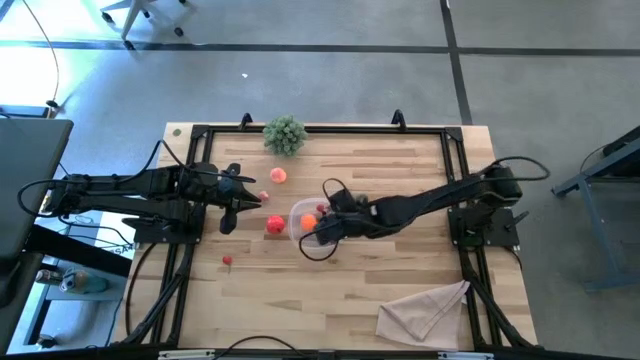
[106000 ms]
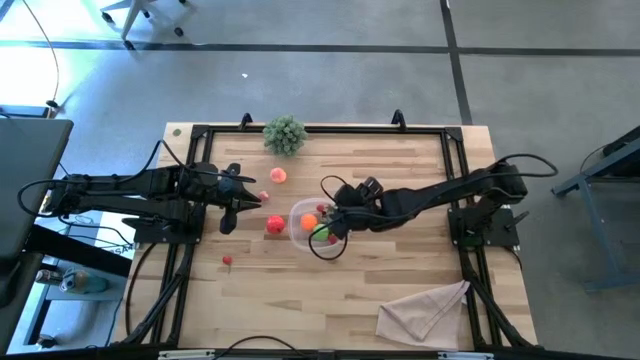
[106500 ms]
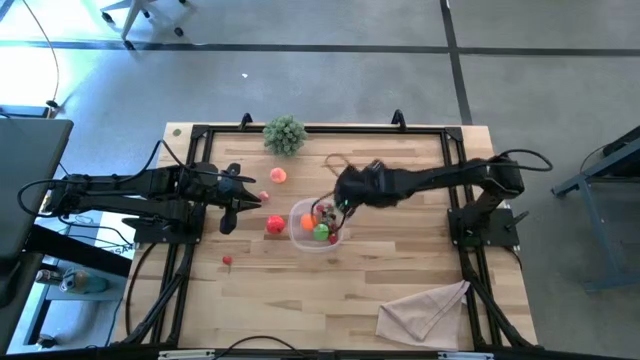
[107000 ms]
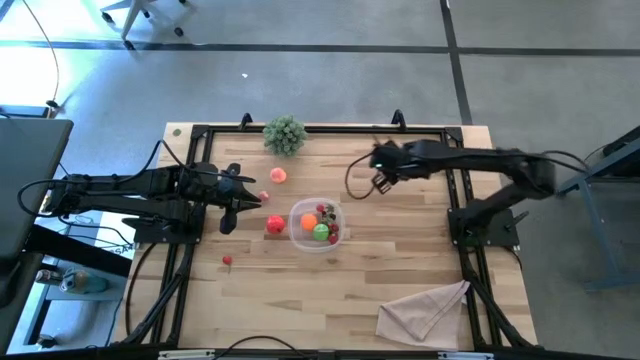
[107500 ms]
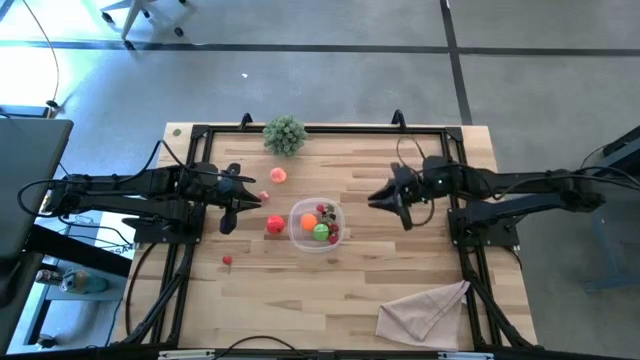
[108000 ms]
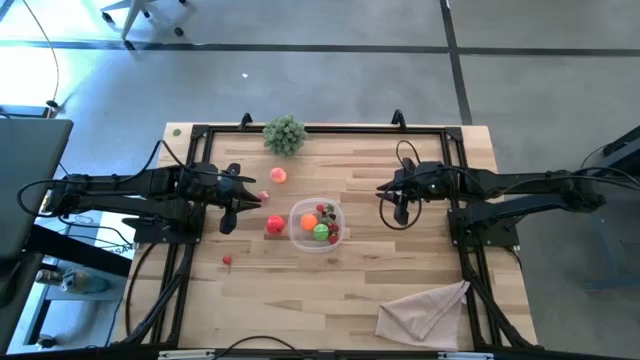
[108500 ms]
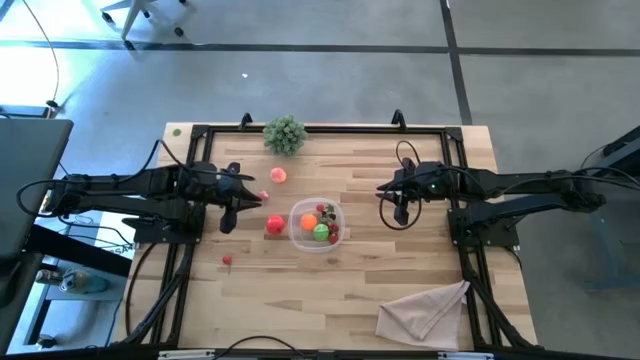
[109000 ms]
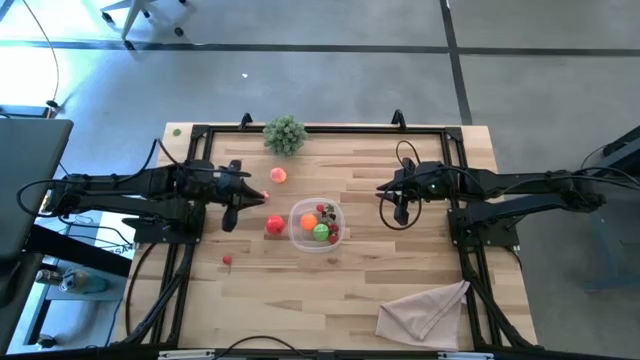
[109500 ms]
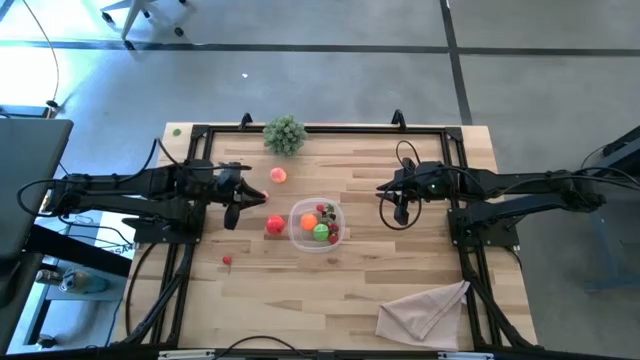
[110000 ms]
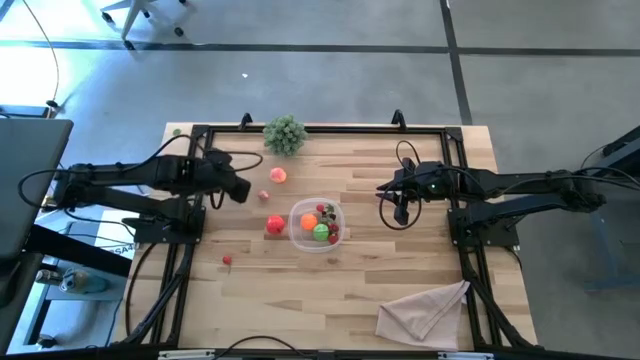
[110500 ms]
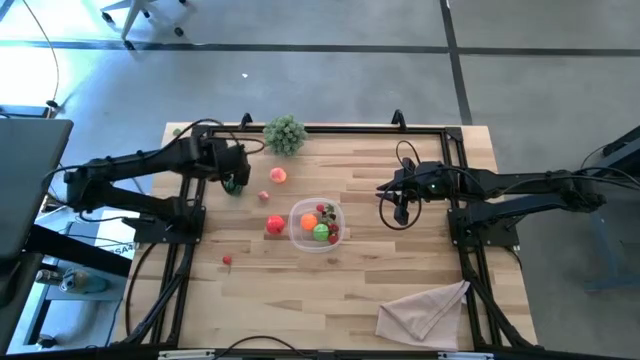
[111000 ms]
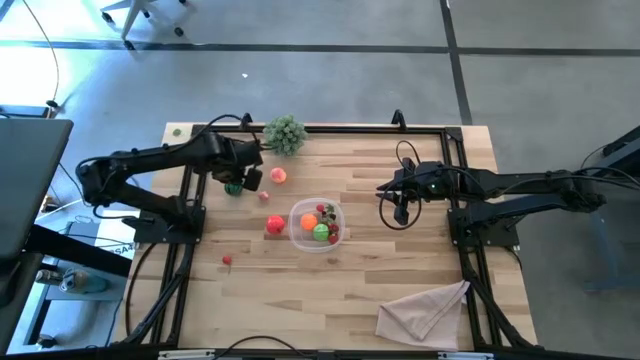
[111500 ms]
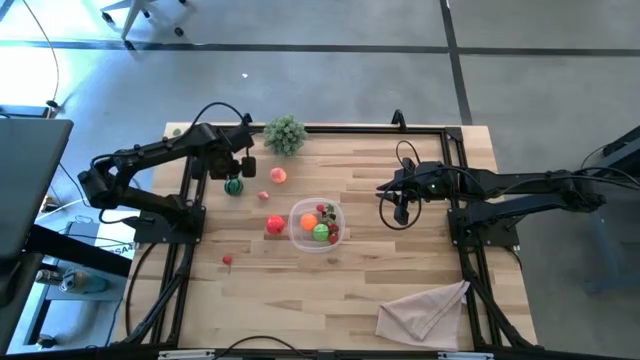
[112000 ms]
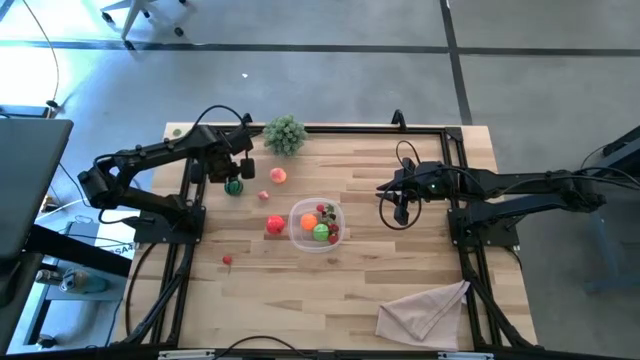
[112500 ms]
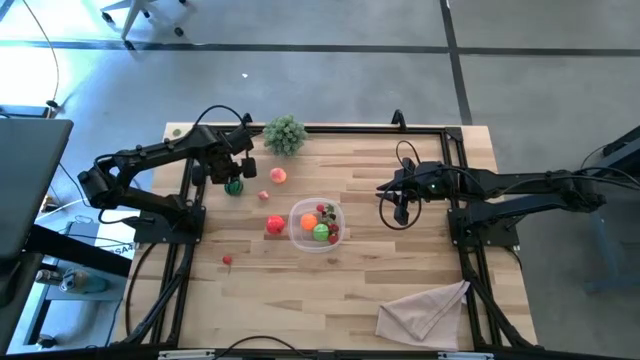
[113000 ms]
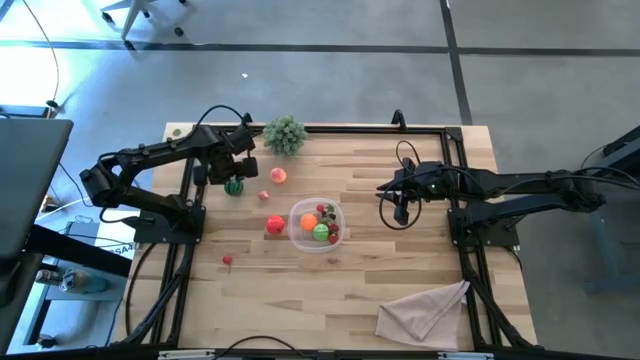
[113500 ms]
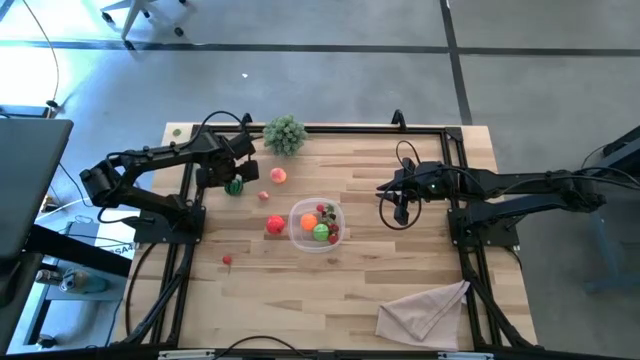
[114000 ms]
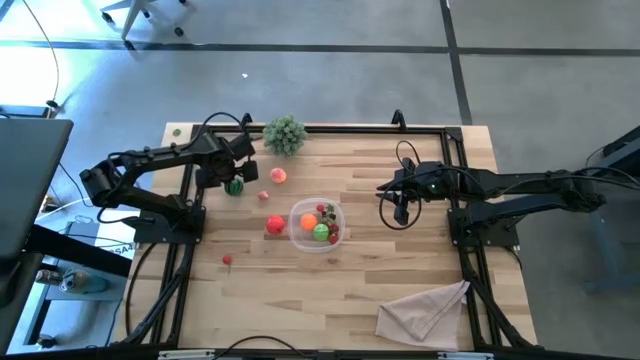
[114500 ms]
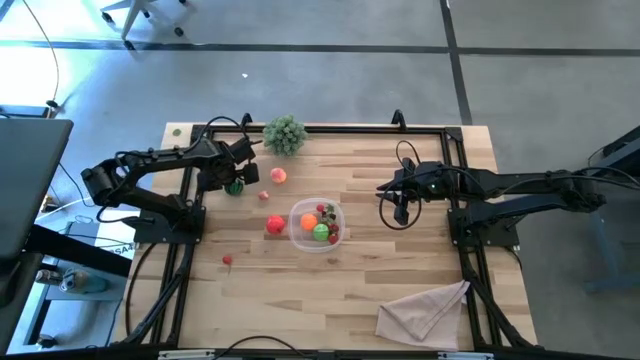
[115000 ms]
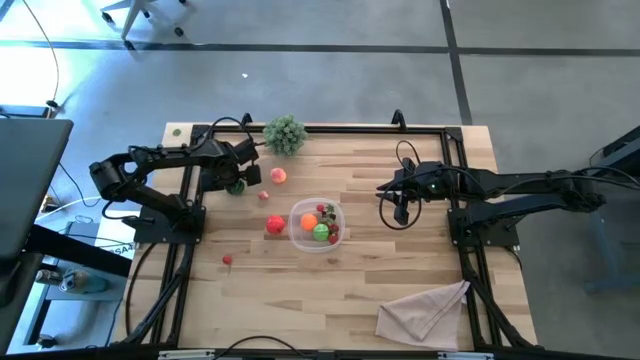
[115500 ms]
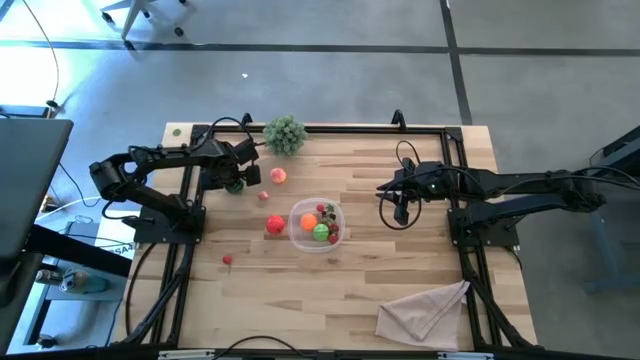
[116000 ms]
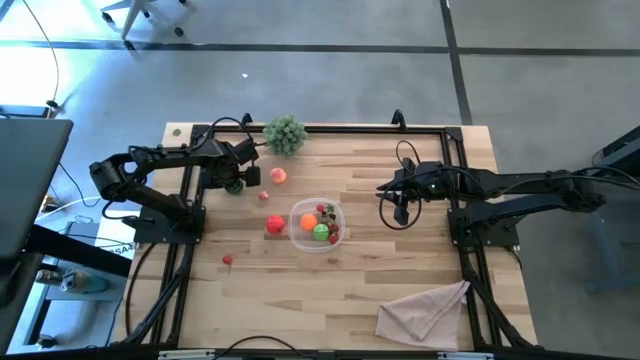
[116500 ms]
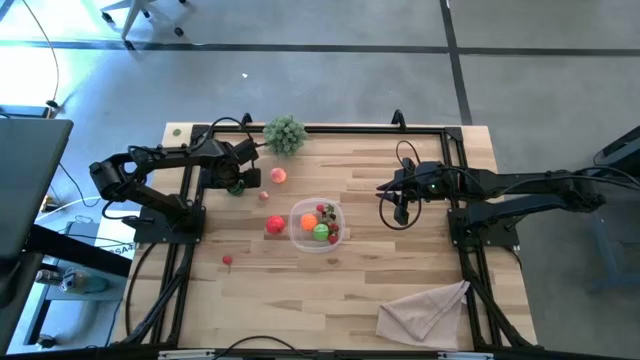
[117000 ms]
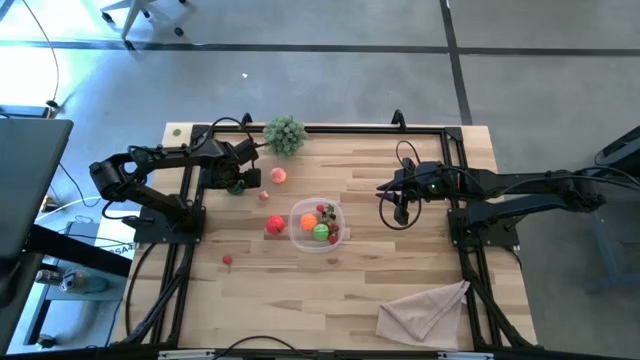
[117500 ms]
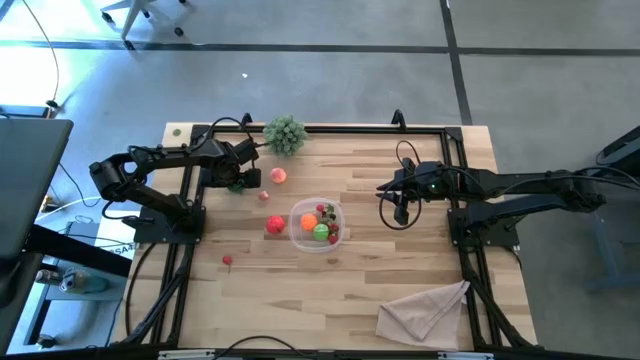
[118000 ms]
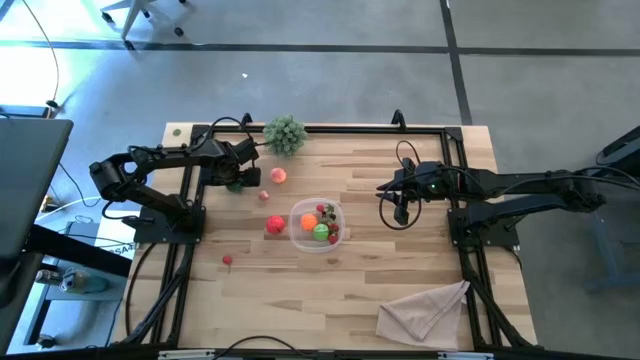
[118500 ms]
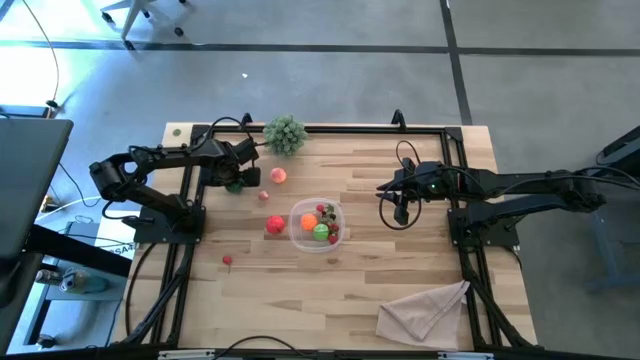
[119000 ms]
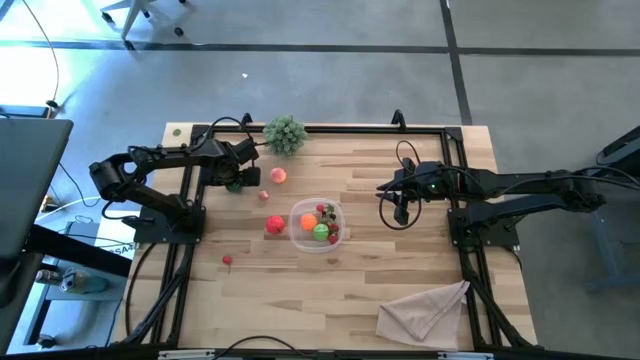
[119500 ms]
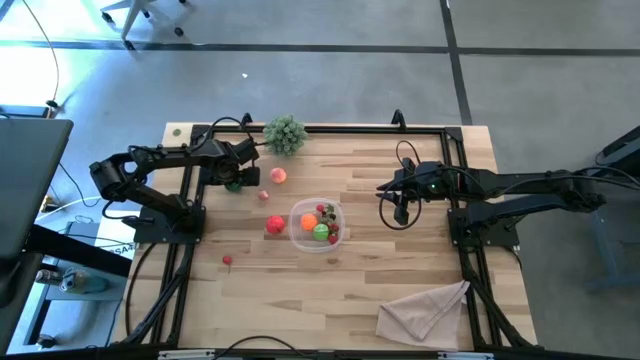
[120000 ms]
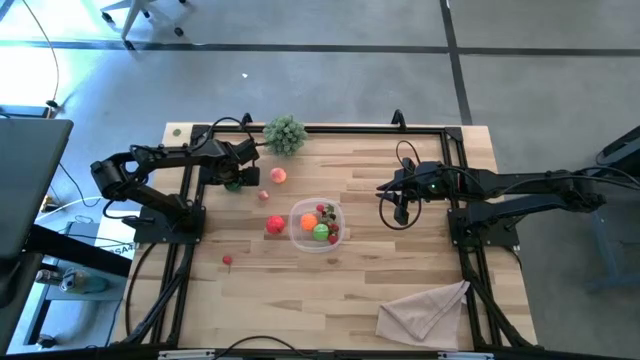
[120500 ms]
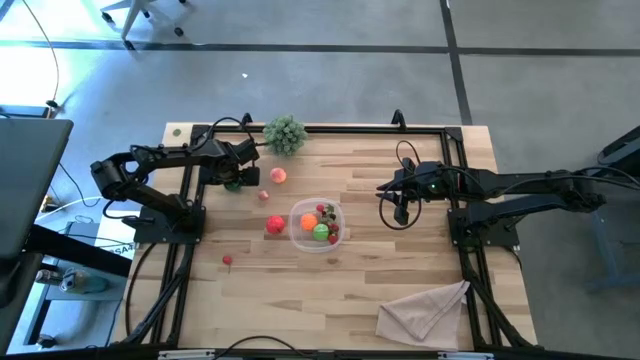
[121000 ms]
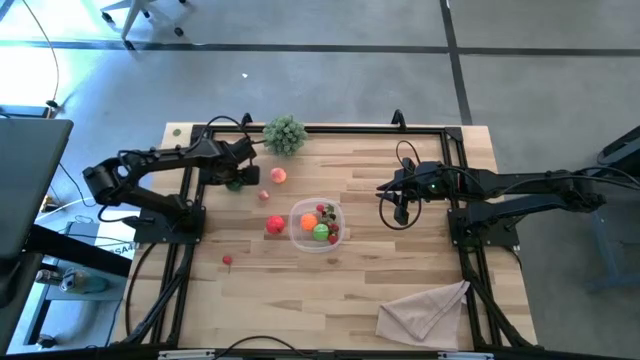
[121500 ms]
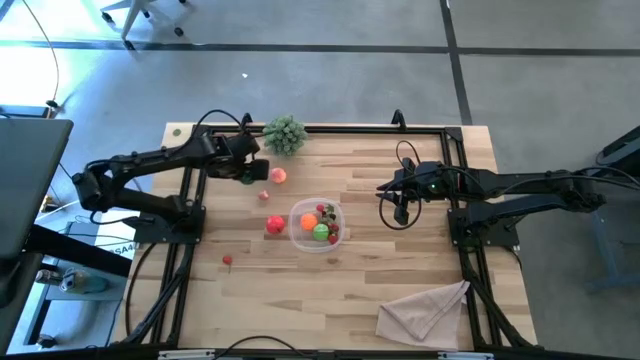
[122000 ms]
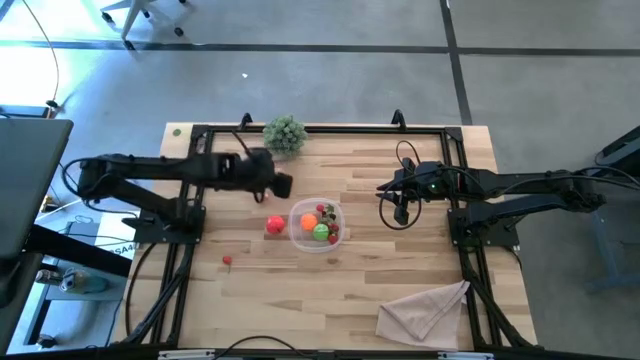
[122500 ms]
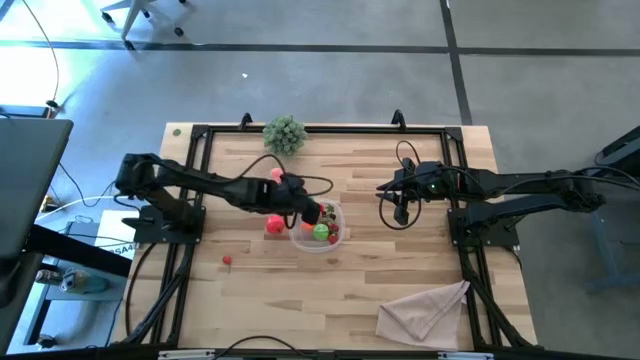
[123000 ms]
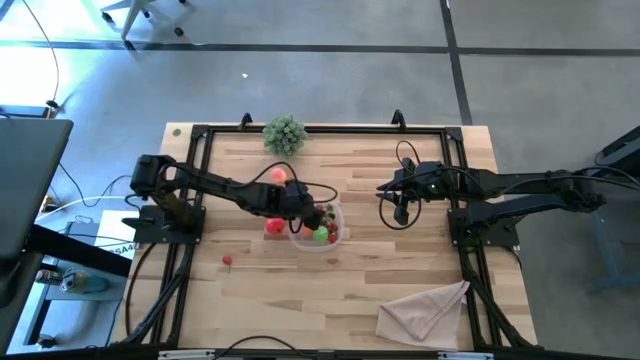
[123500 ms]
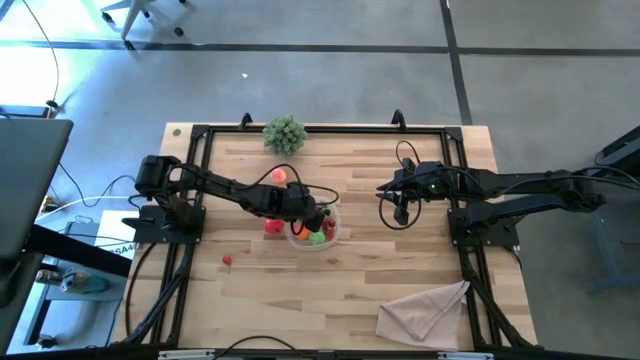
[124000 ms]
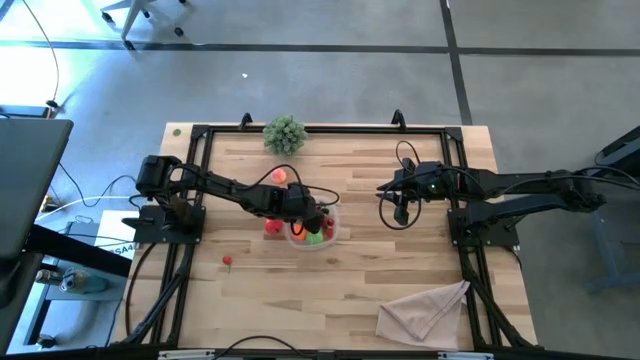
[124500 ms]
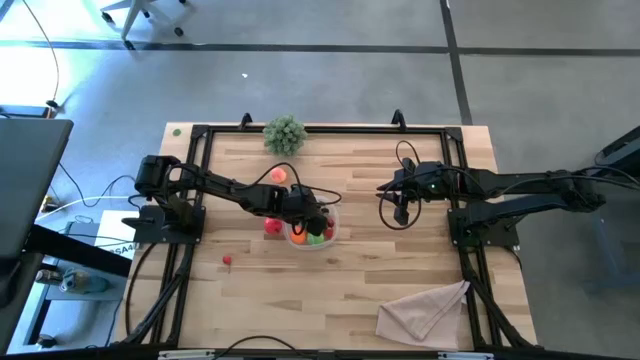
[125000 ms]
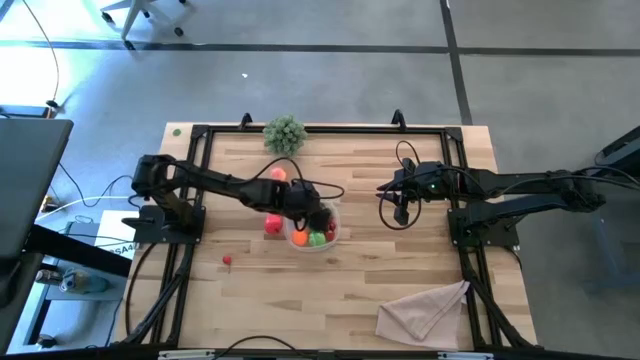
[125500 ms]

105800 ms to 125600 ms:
Task: Pick and placing Produce into tupperware
Put the watermelon into the transparent bin
